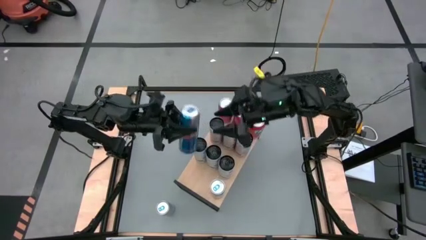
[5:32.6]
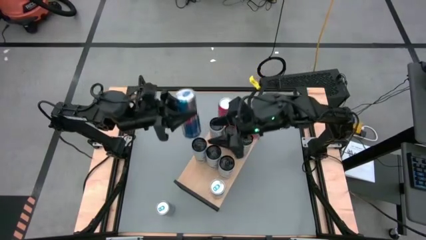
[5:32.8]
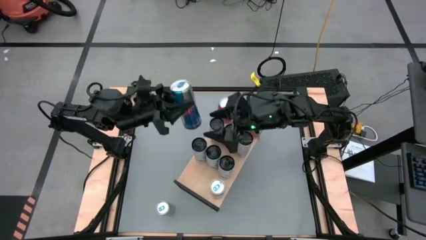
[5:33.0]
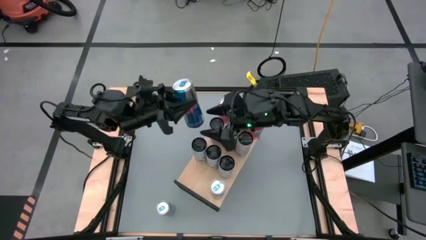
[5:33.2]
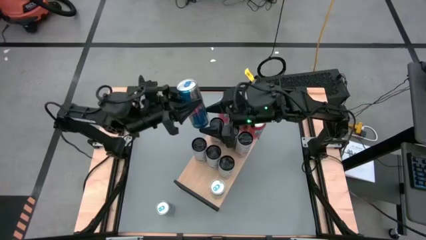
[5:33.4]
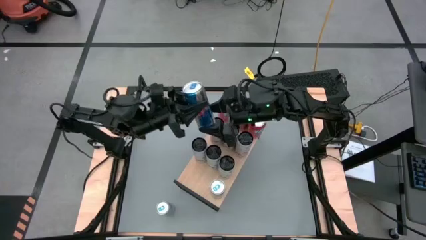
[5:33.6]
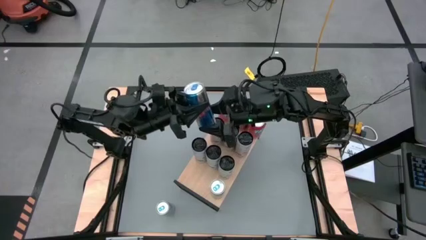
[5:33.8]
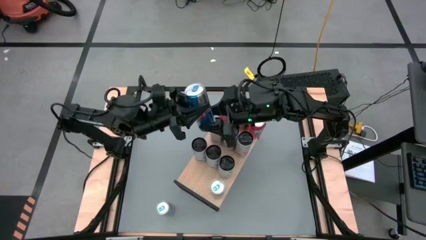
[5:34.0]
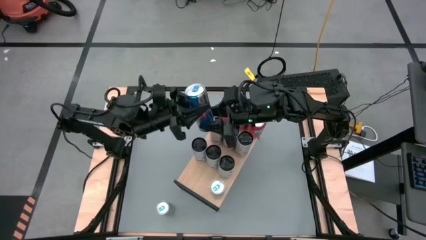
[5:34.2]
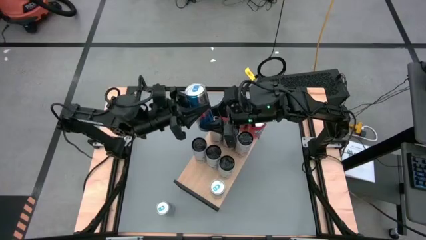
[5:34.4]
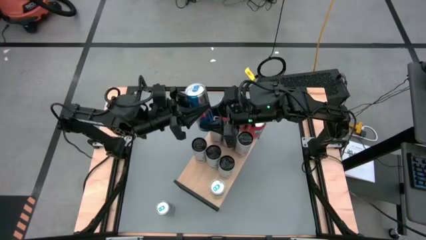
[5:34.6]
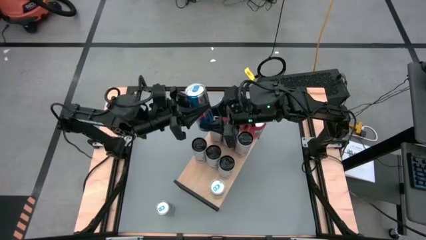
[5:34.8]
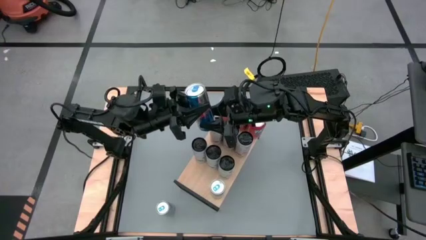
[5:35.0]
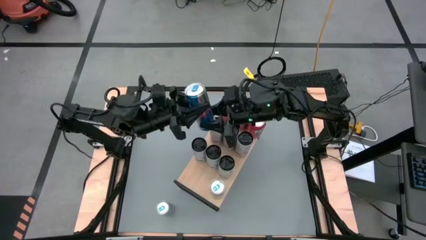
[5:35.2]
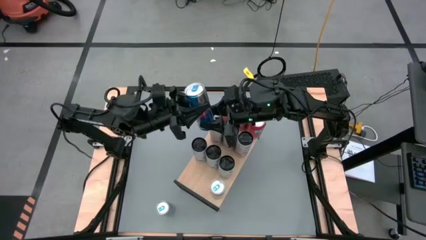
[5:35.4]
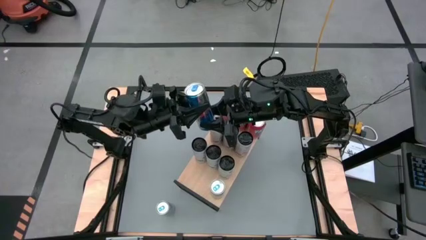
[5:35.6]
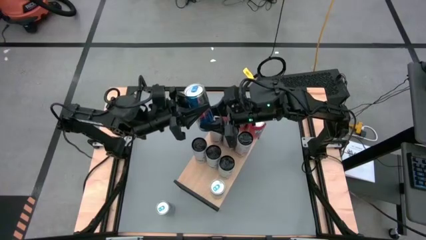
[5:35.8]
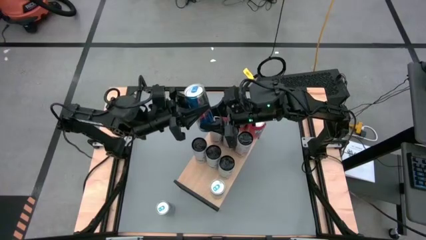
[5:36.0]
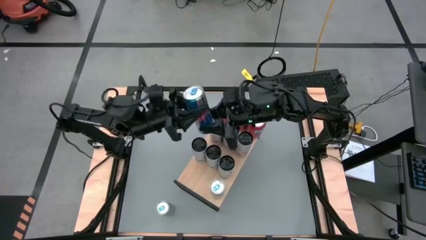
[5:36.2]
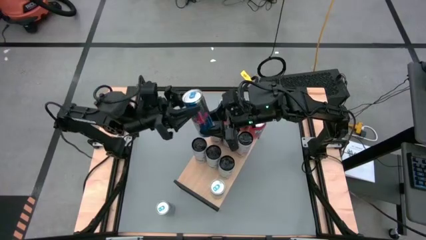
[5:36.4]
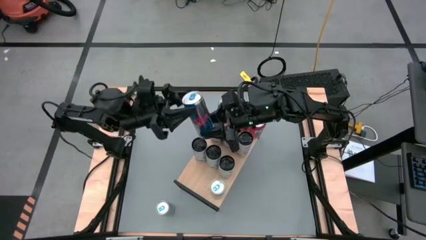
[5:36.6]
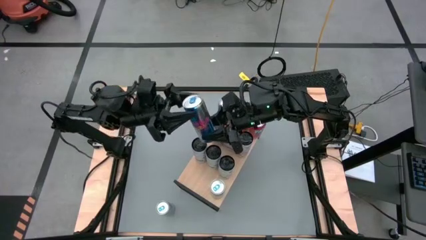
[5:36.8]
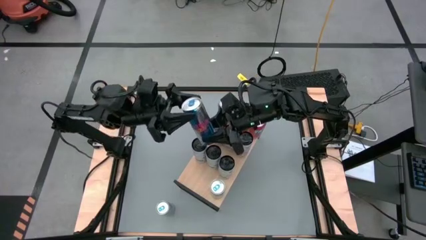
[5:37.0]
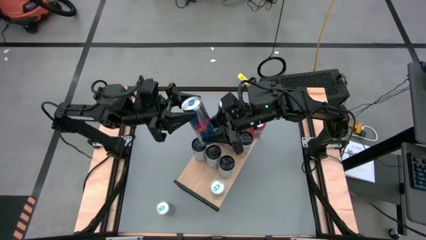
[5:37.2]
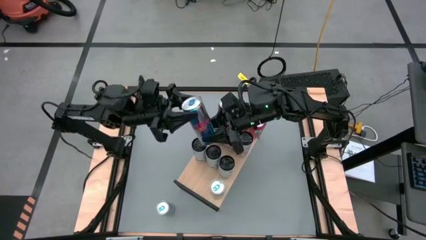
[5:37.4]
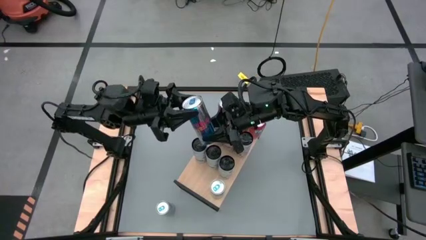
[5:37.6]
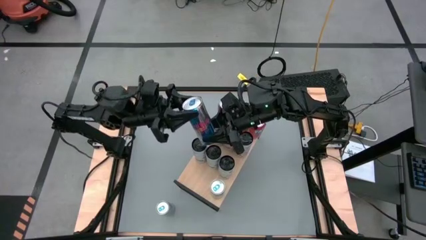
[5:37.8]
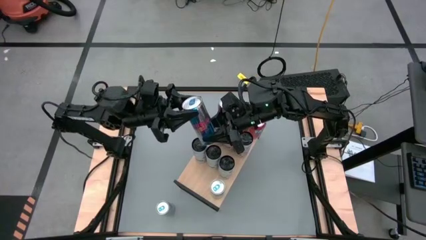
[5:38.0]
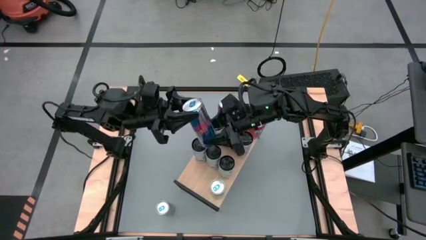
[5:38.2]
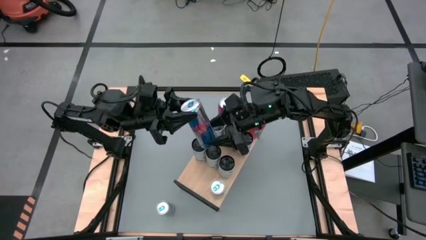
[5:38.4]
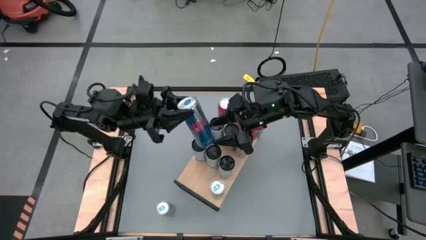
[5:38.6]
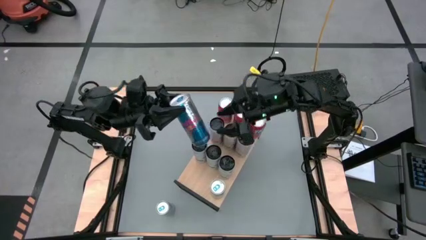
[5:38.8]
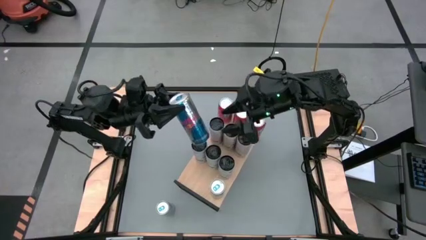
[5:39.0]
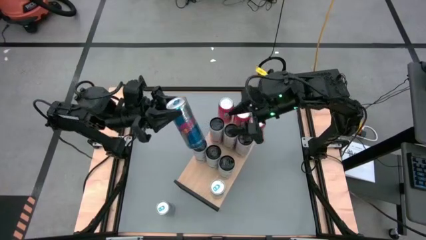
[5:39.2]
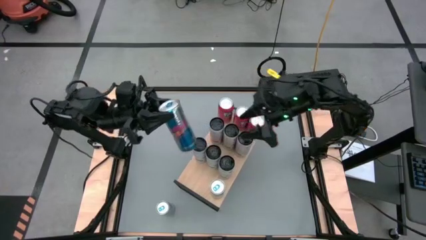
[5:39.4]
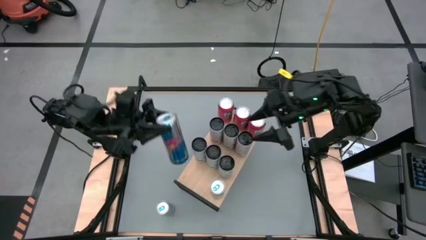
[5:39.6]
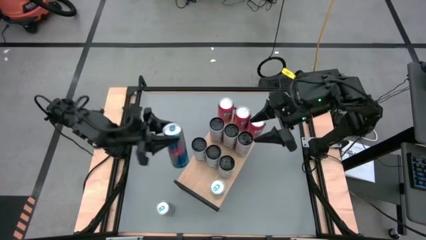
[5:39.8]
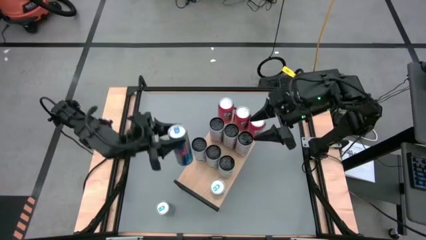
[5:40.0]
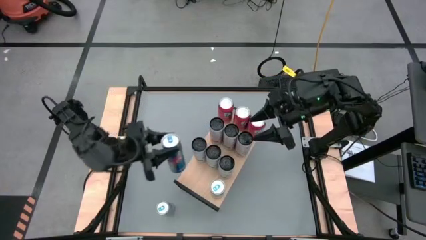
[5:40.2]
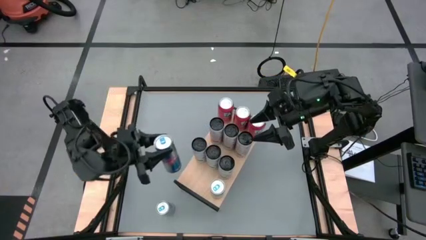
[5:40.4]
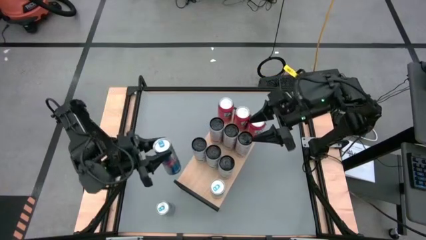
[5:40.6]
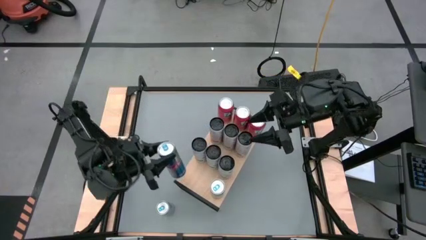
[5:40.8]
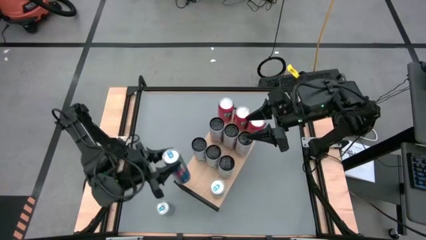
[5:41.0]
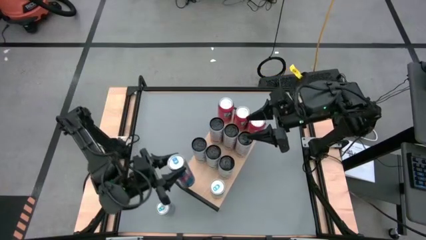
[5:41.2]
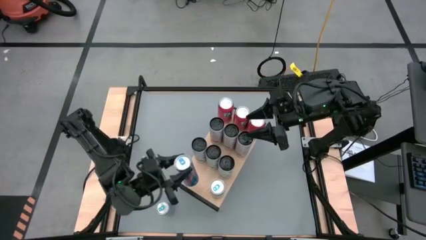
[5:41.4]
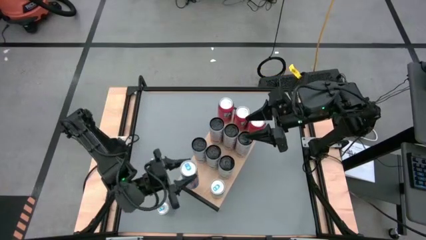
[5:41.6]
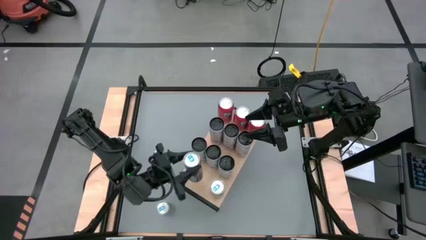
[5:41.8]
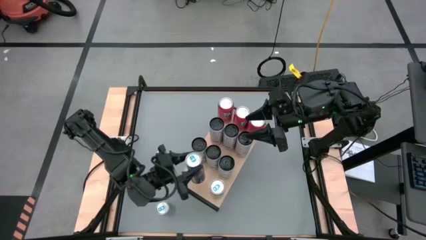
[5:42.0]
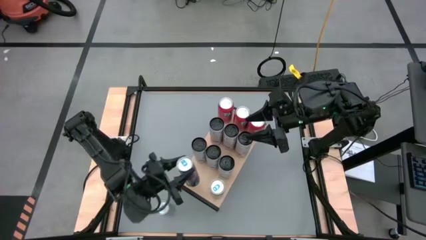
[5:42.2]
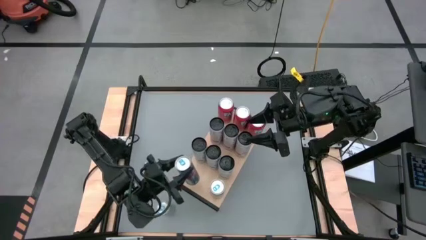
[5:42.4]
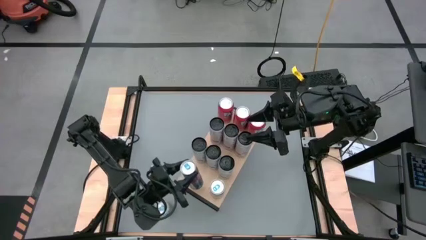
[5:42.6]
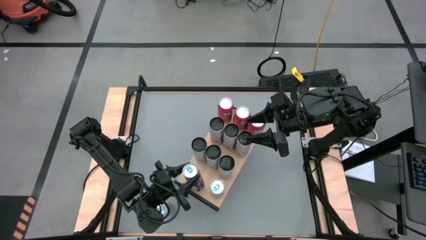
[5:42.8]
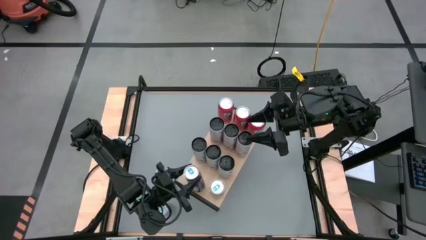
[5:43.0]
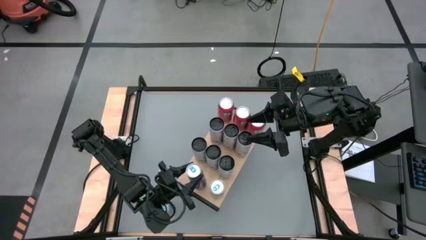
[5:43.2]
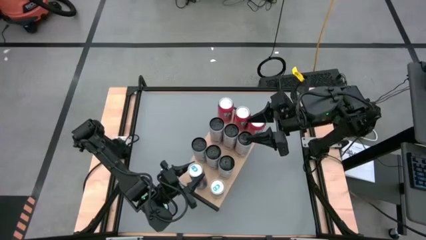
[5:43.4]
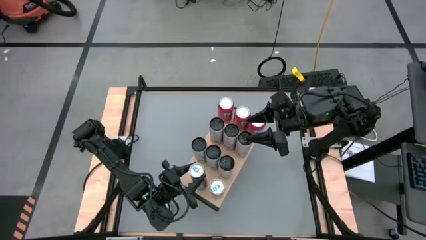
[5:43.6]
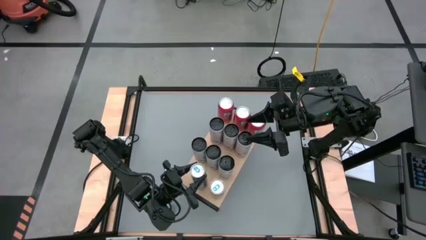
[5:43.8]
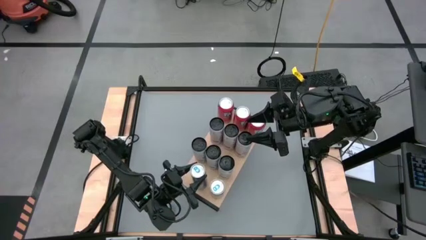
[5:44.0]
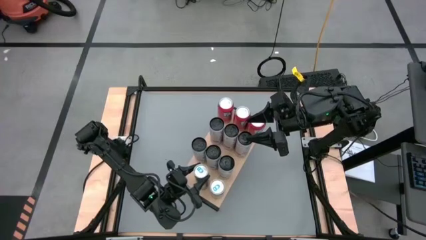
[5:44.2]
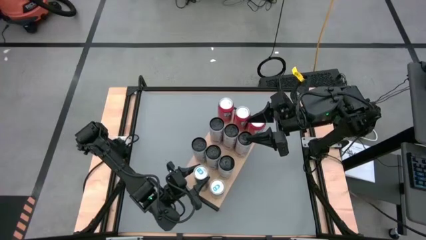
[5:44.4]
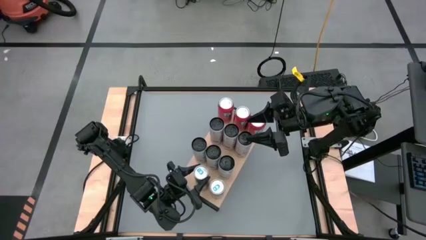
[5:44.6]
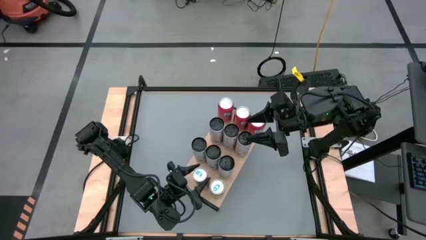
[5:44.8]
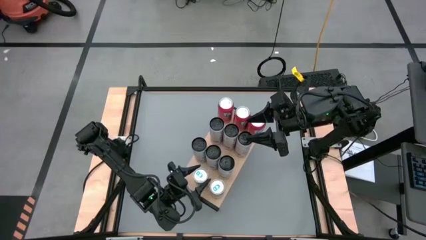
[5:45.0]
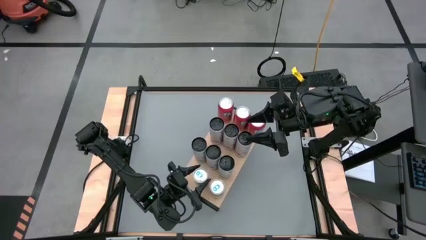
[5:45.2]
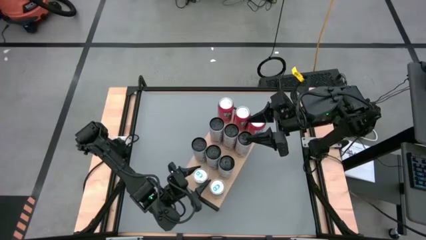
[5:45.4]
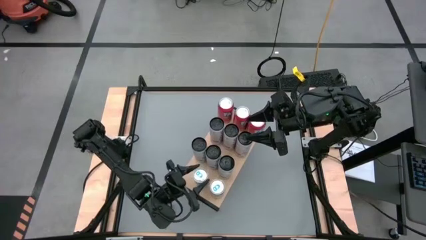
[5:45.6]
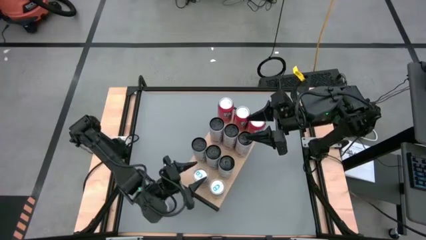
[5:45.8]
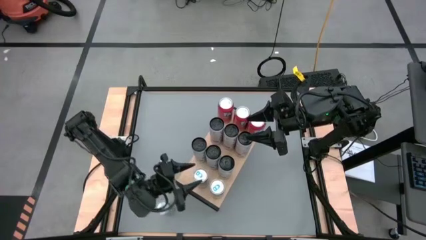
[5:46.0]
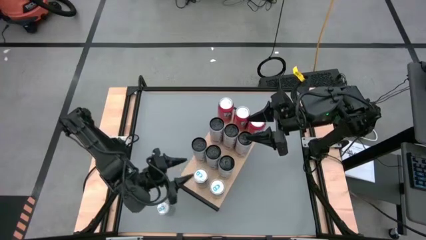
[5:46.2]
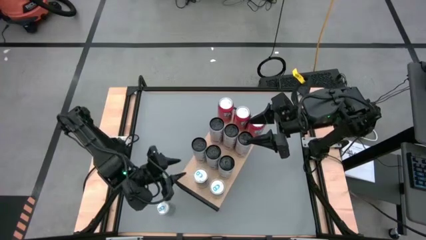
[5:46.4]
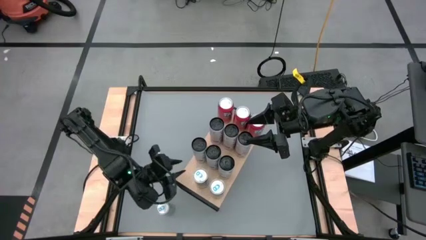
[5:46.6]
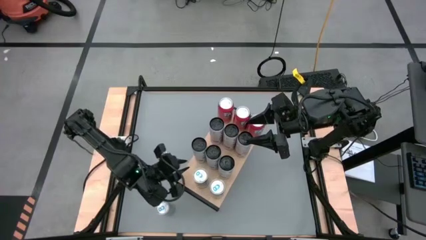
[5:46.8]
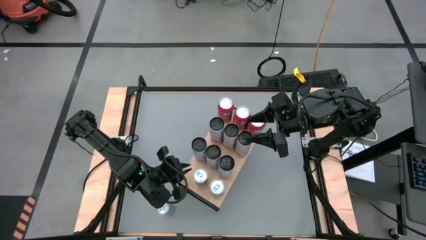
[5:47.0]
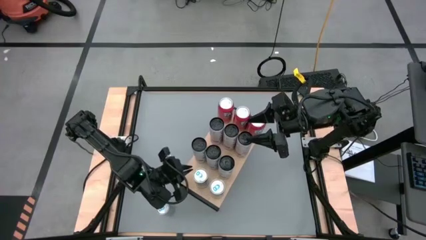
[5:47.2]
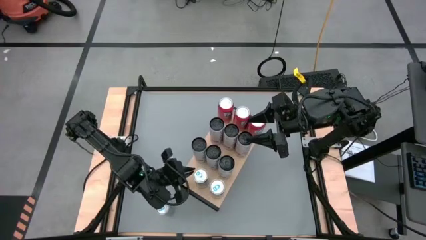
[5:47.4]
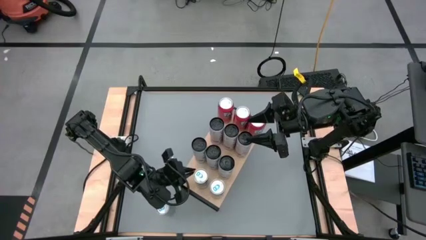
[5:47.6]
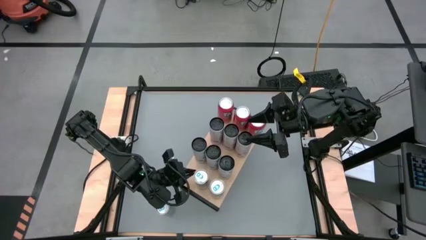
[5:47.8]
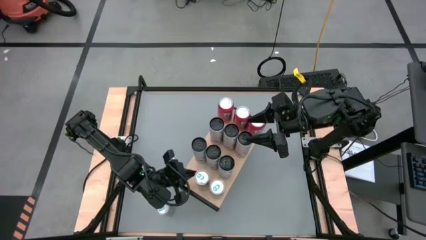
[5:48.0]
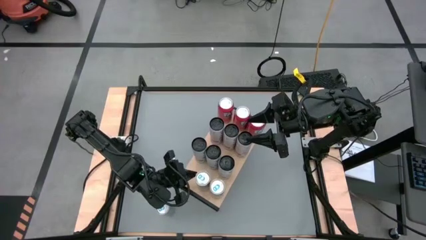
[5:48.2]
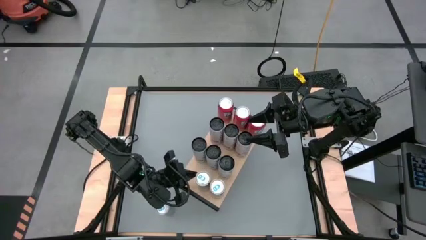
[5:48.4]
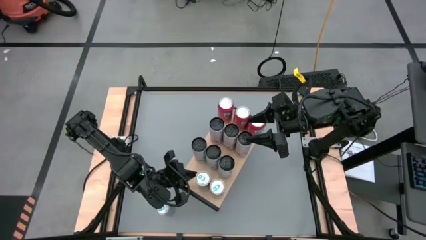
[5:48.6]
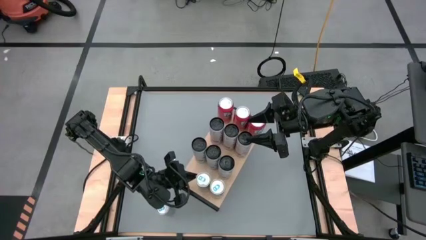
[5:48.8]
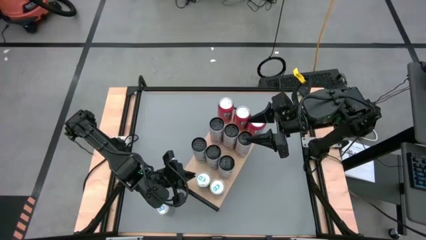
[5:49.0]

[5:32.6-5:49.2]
Task: Place canned beverage on shelf
Put the blue soda can on the shelf aligned with the other blue soda can
